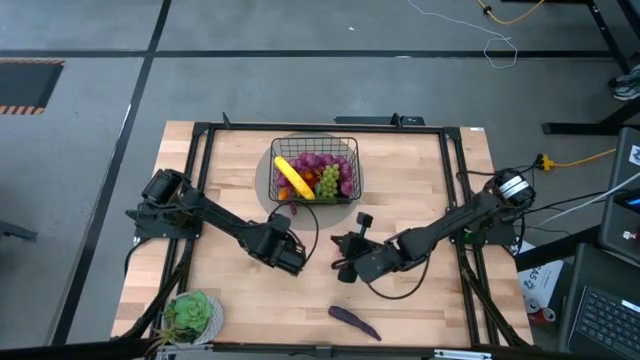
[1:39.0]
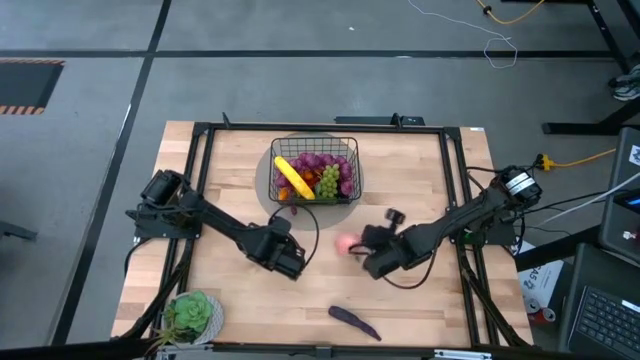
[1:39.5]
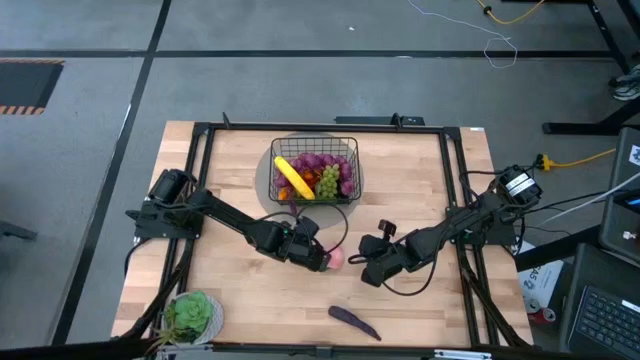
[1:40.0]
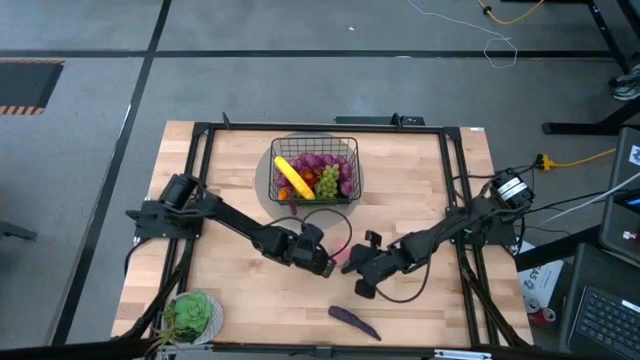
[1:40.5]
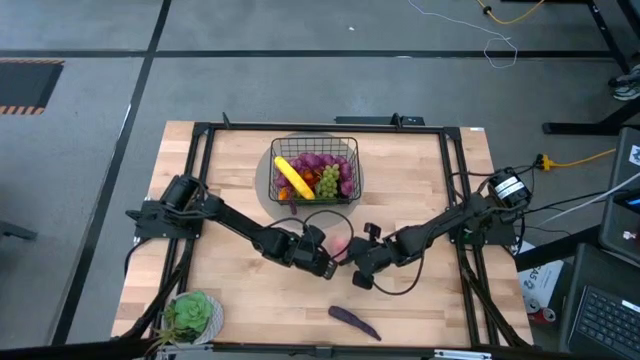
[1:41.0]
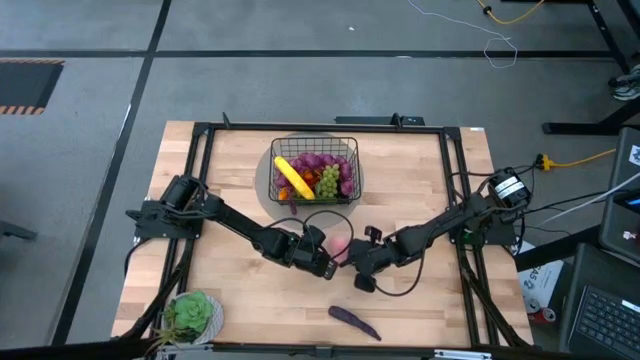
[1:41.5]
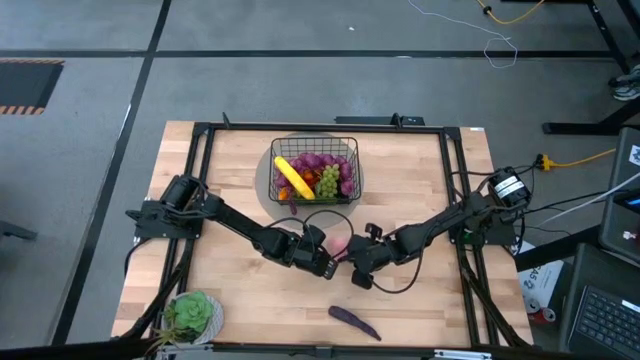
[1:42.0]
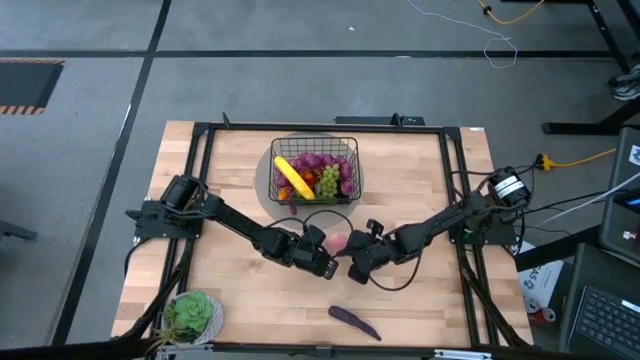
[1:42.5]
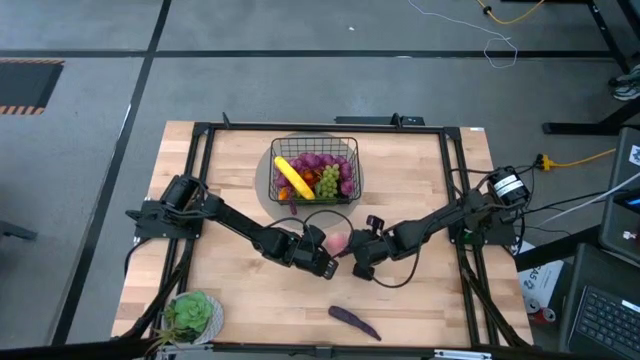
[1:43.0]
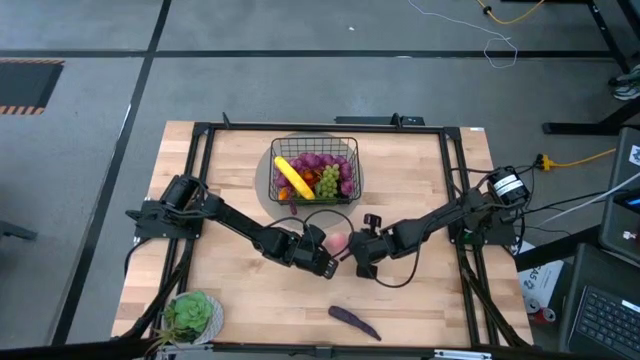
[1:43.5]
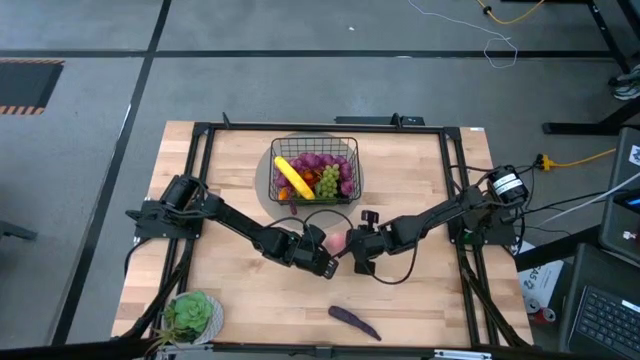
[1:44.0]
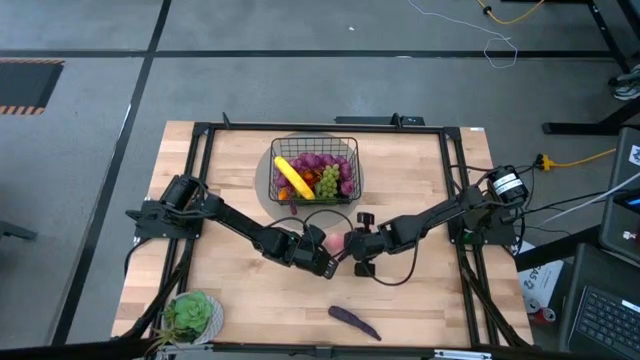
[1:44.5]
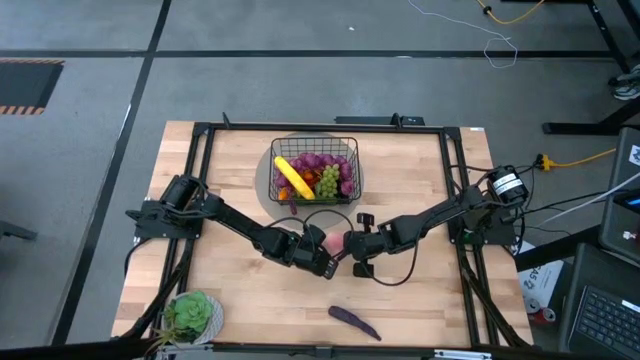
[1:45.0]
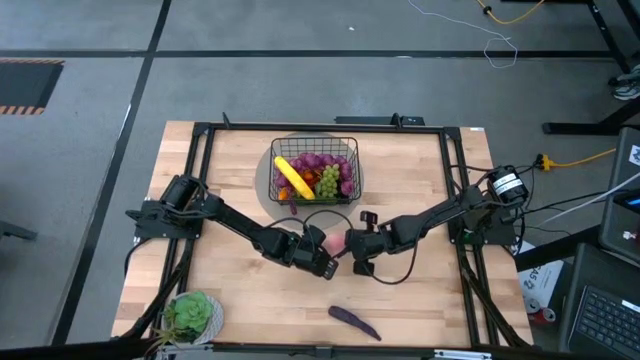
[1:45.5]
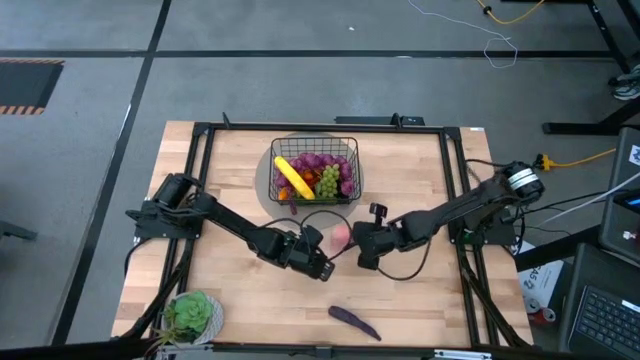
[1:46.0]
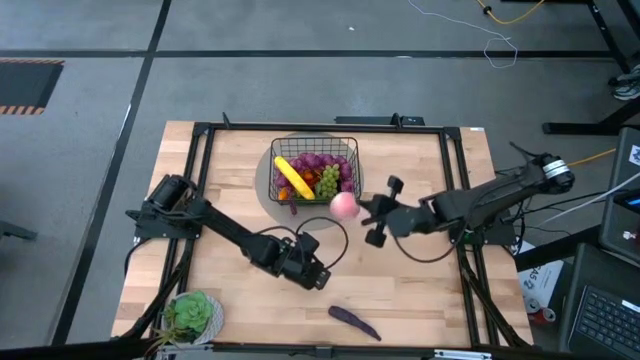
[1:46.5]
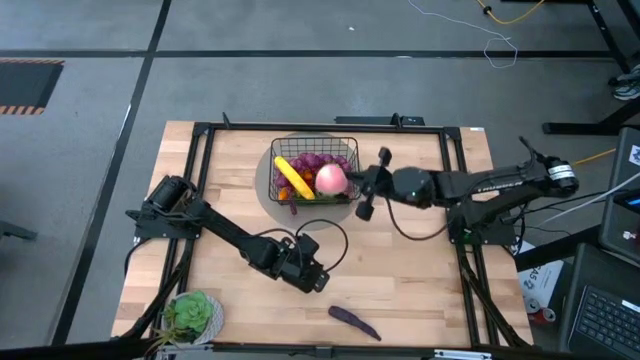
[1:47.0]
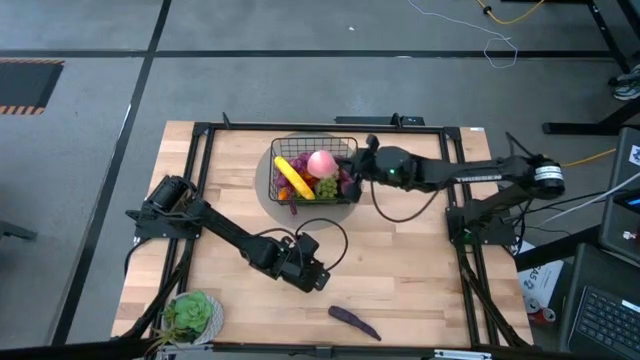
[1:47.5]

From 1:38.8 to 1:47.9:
Task: Build produce basket
Put the pink peach into the wire basket

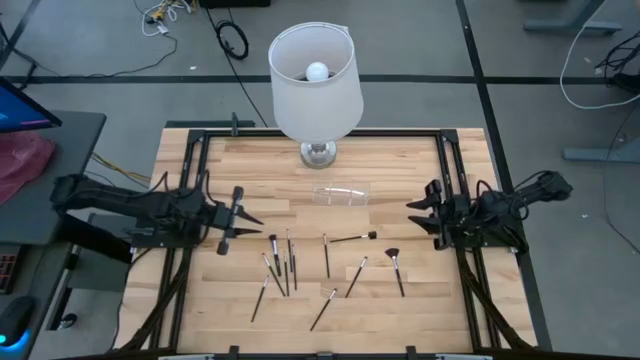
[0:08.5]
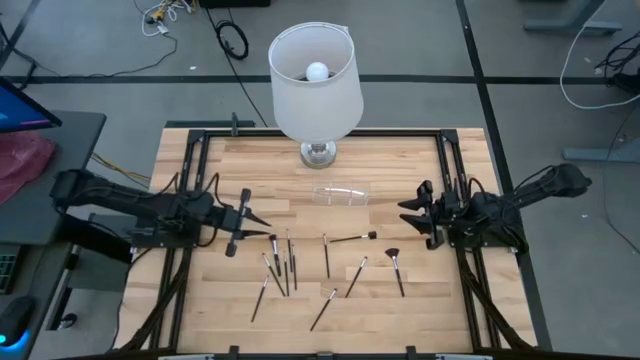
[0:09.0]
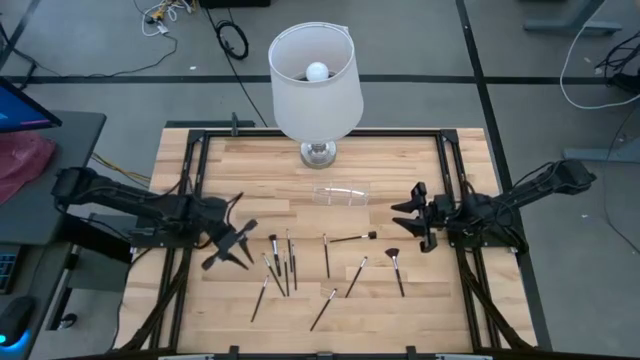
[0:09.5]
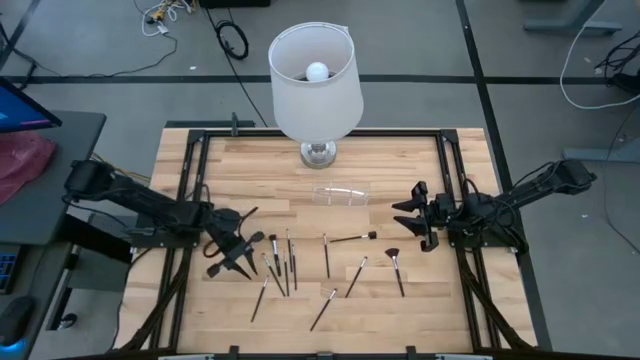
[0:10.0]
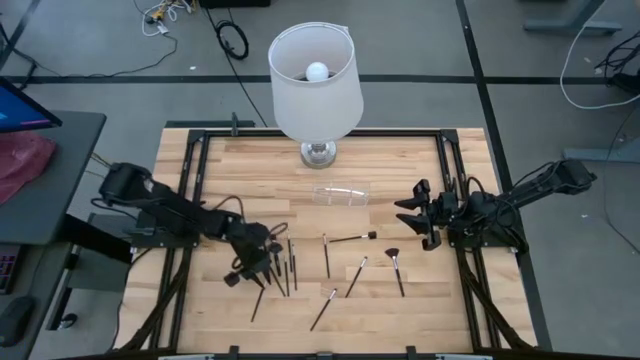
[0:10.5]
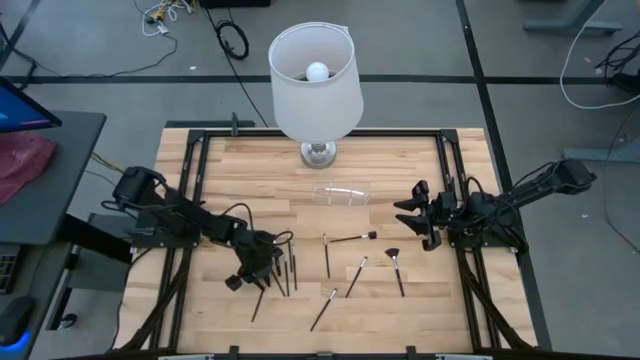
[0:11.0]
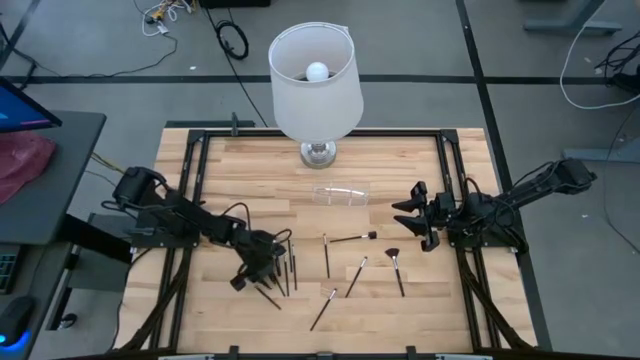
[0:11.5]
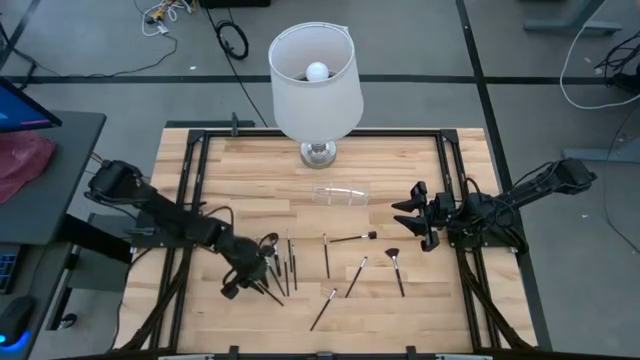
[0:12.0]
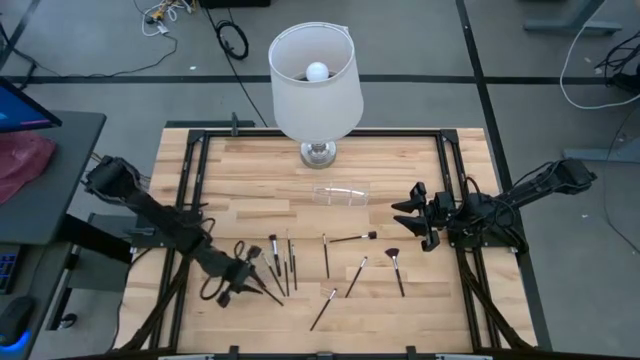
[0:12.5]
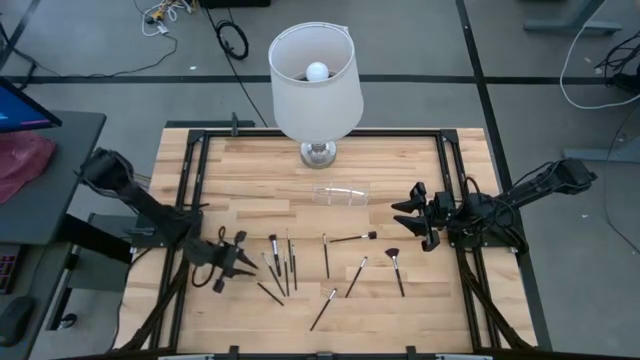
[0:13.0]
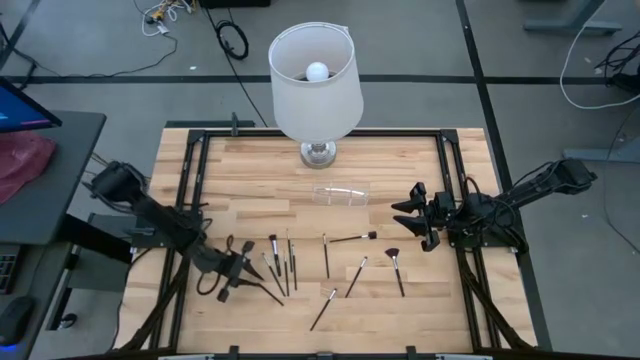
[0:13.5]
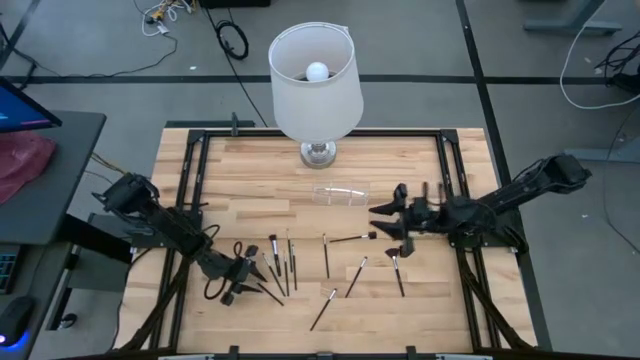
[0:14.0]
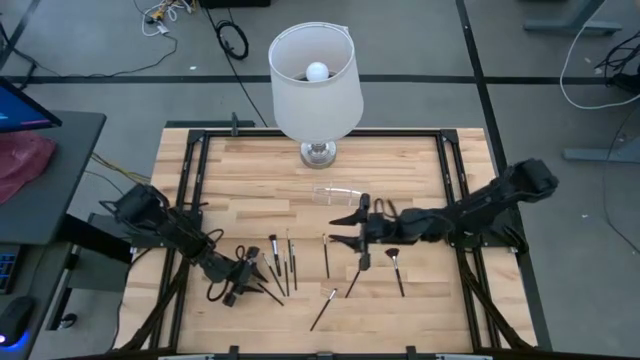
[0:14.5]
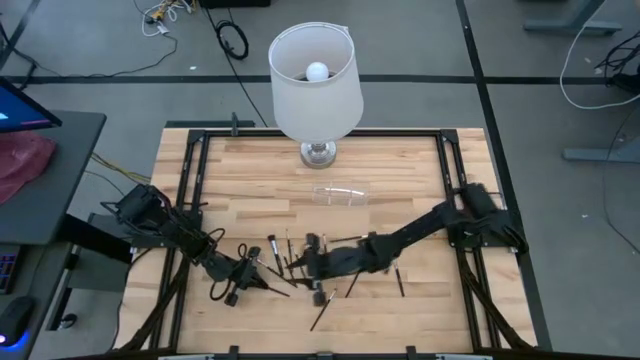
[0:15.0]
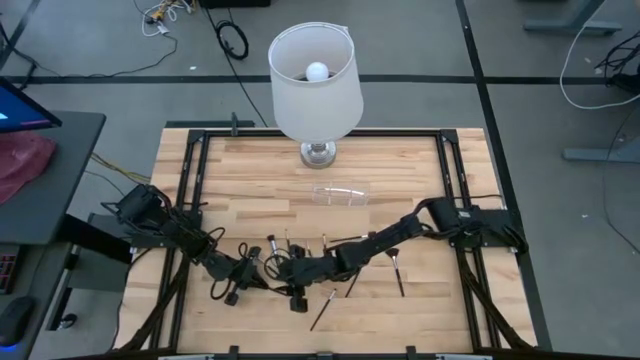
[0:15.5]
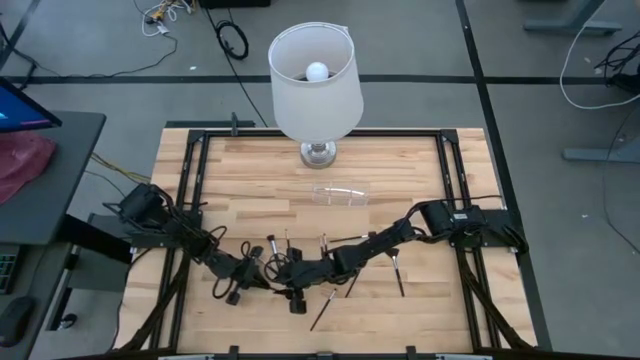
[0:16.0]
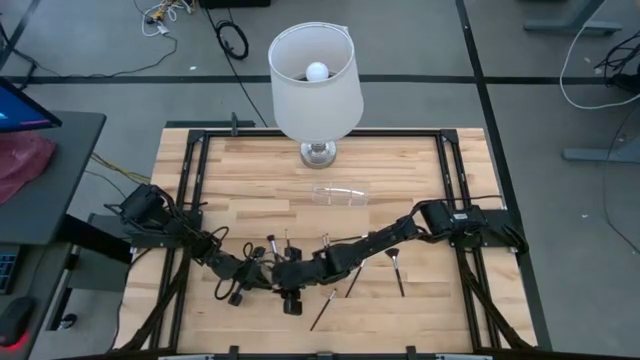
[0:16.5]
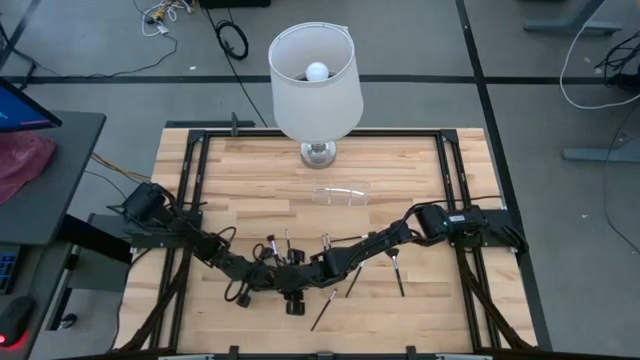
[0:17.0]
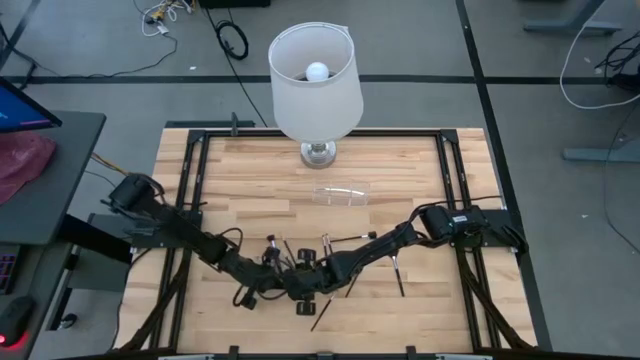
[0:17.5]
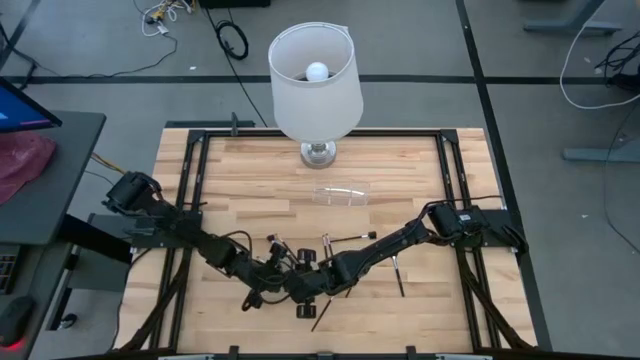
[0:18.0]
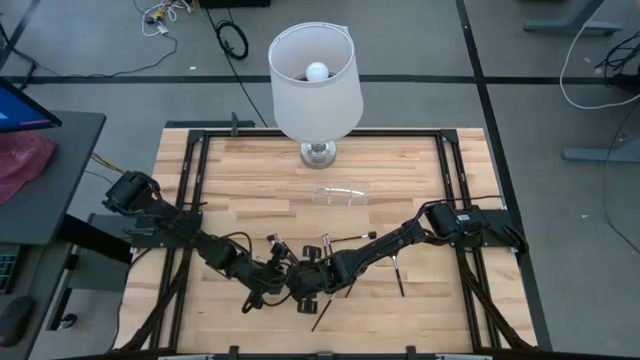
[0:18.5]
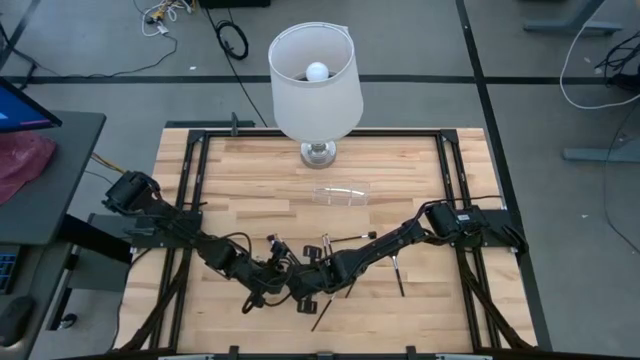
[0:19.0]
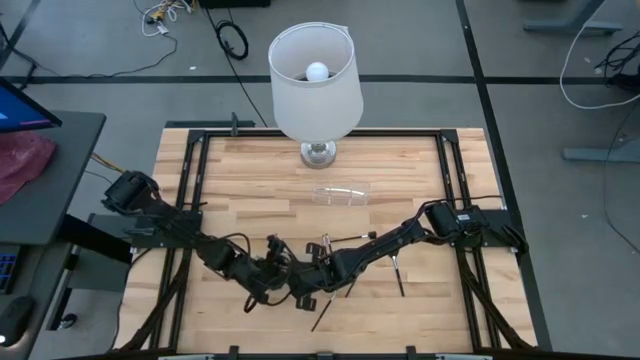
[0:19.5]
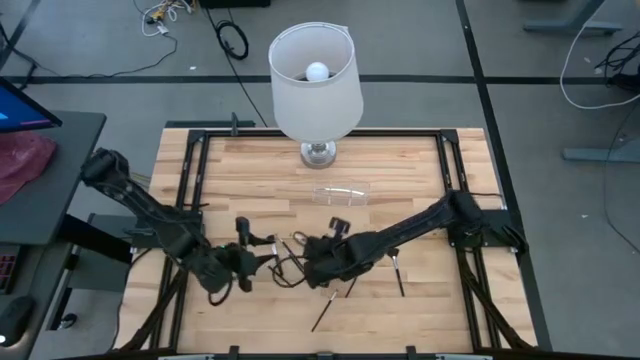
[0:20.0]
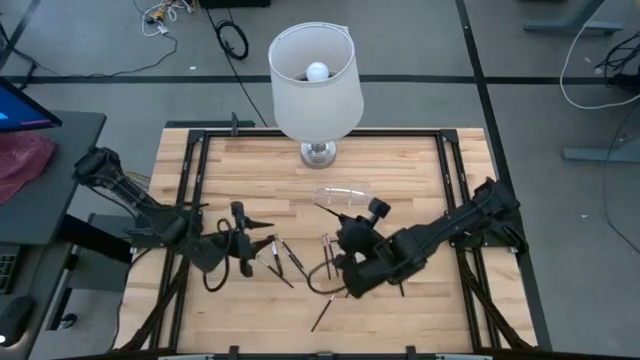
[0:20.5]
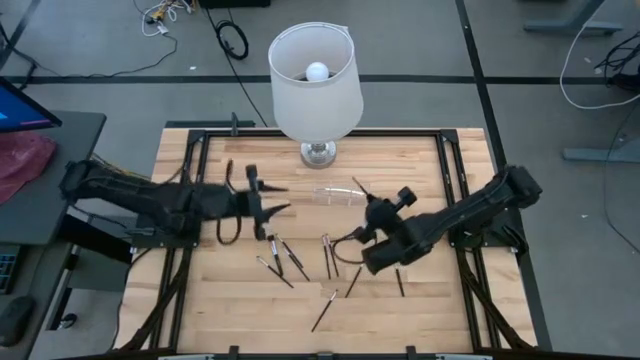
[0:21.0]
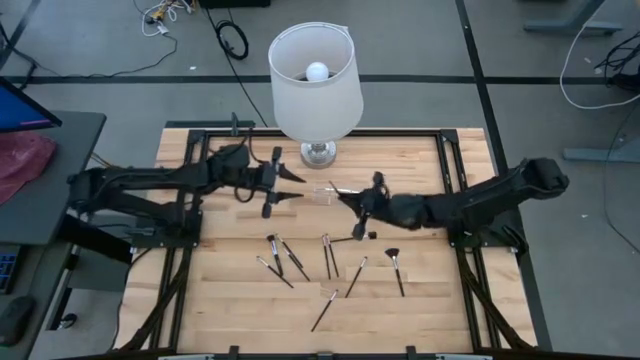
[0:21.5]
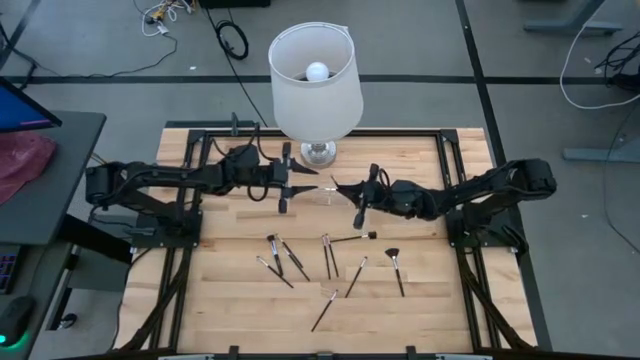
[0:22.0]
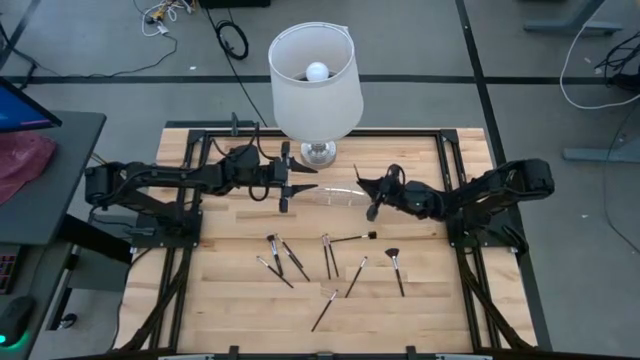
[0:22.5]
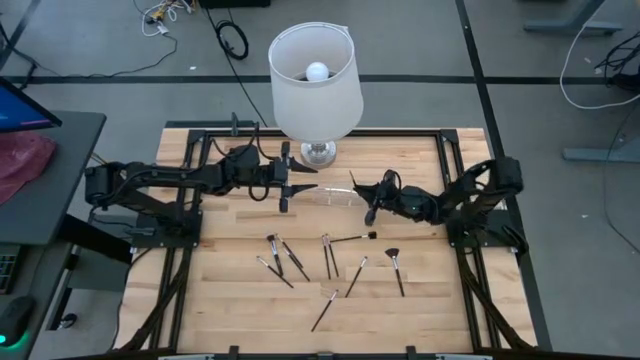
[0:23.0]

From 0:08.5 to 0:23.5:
Task: Put items in baskets/containers
Put the black eyeshadow brush into the transparent organizer
